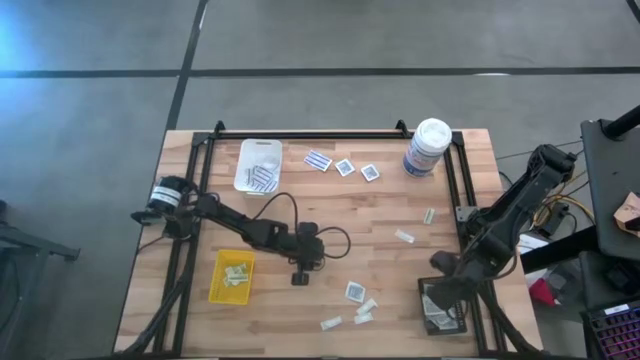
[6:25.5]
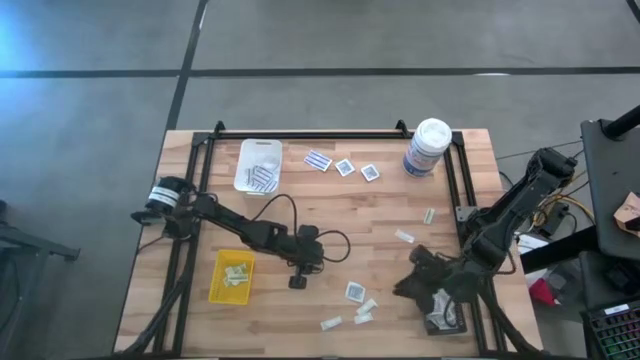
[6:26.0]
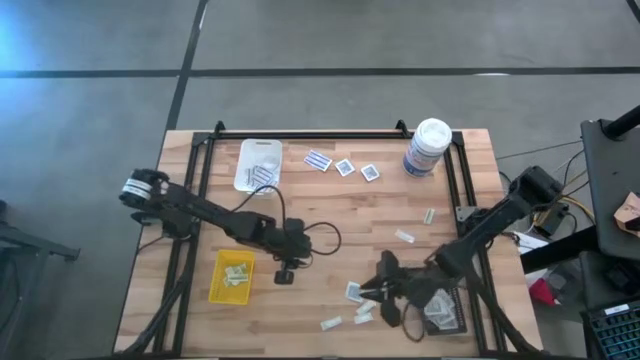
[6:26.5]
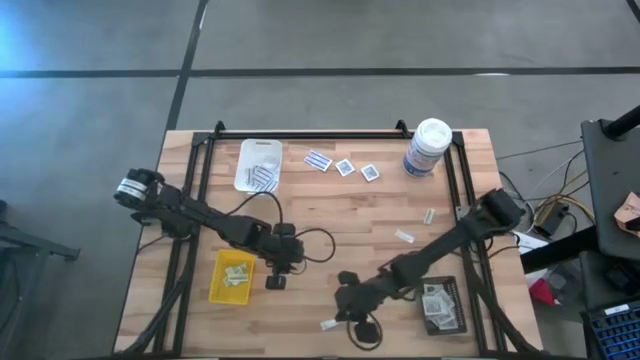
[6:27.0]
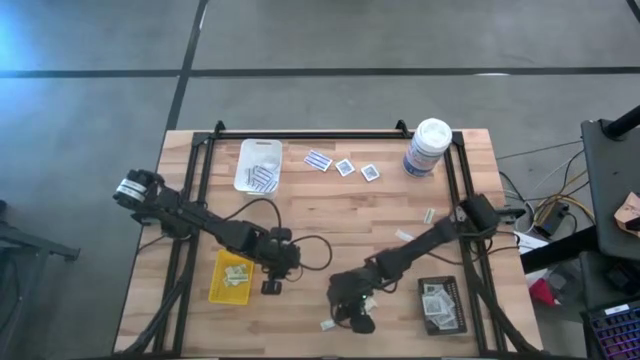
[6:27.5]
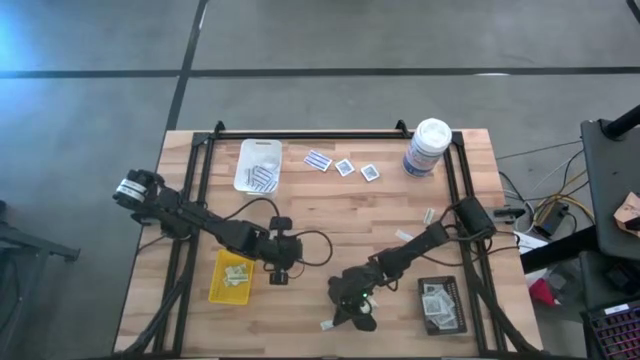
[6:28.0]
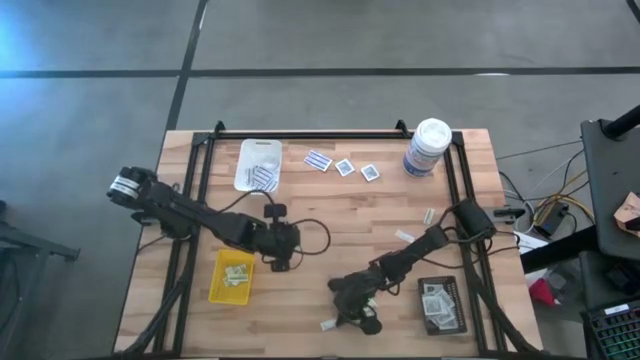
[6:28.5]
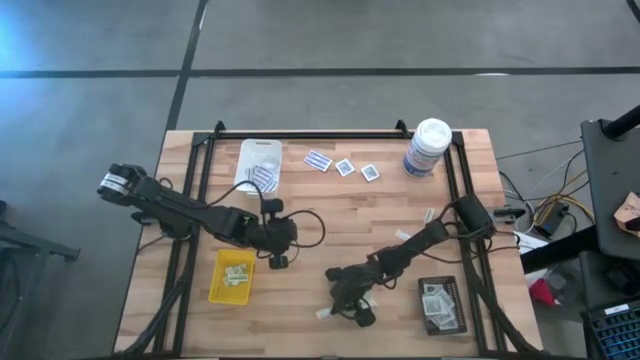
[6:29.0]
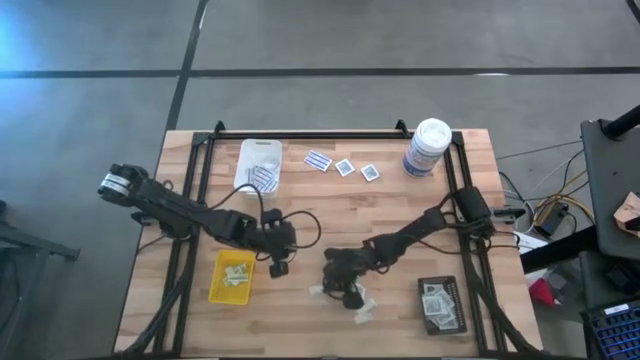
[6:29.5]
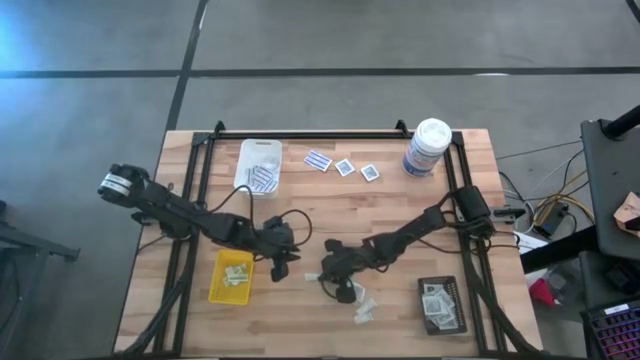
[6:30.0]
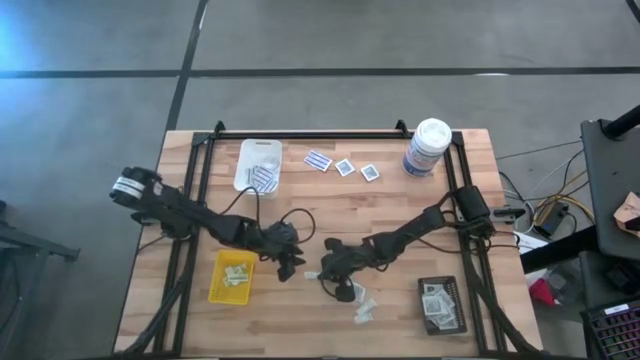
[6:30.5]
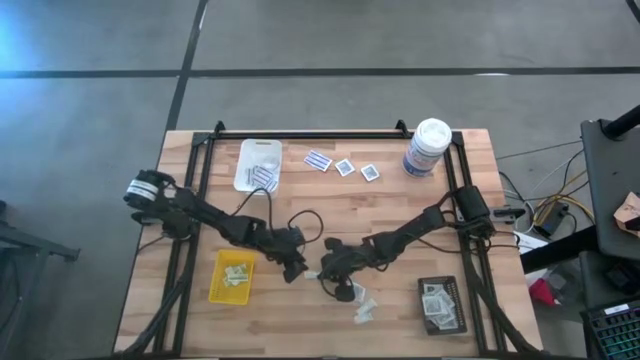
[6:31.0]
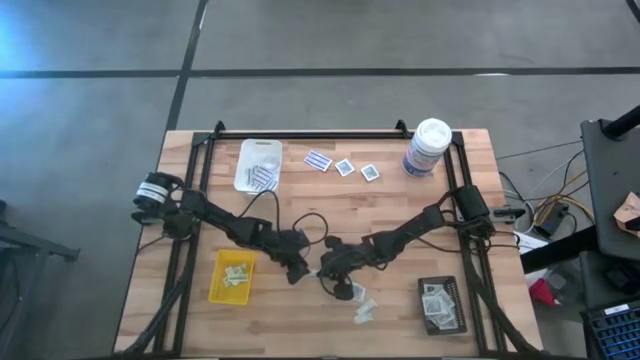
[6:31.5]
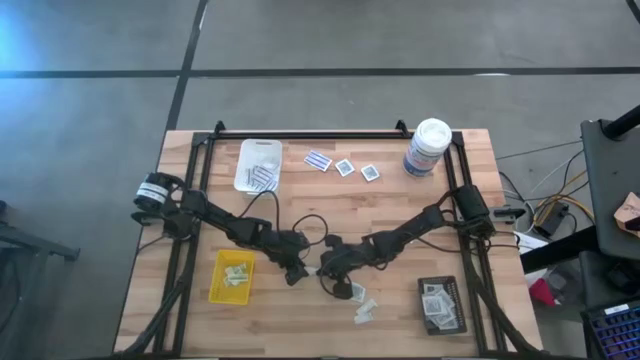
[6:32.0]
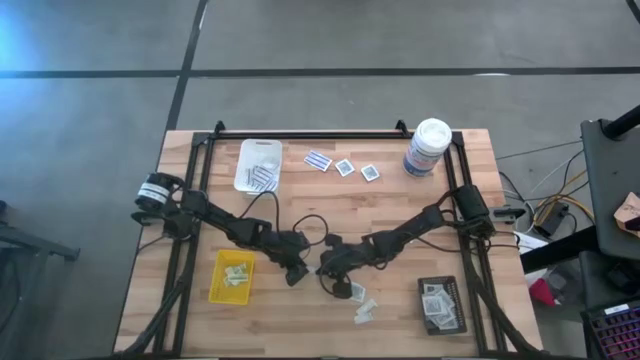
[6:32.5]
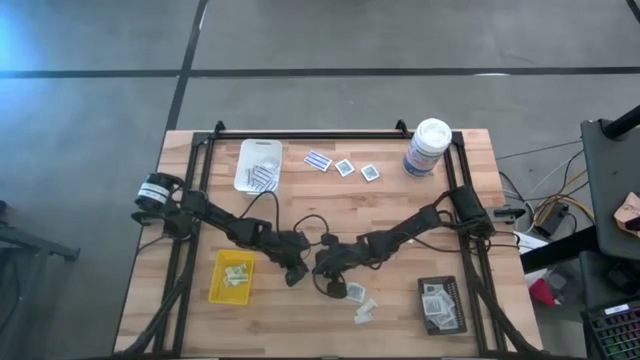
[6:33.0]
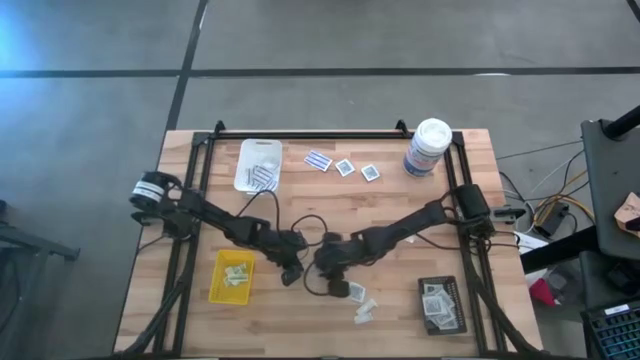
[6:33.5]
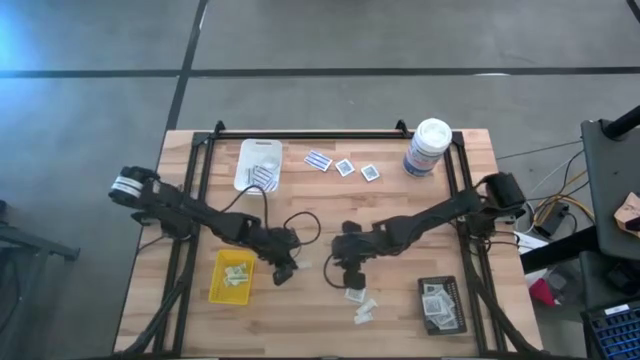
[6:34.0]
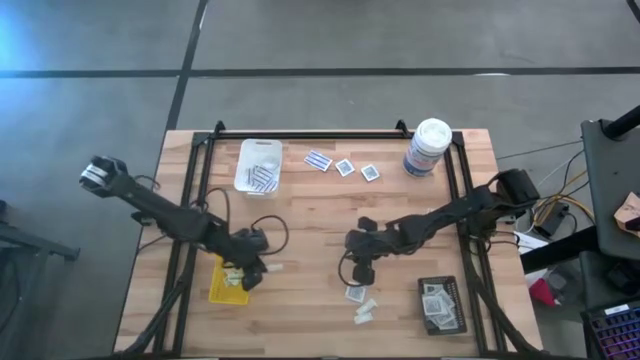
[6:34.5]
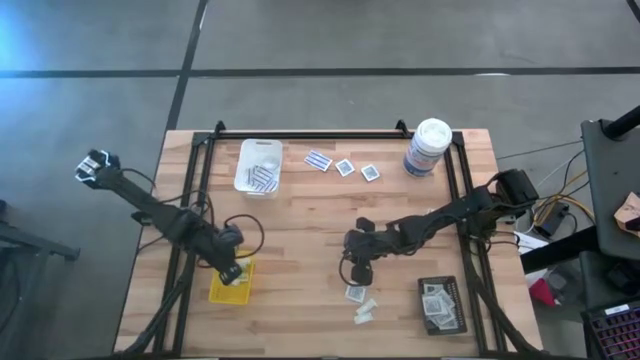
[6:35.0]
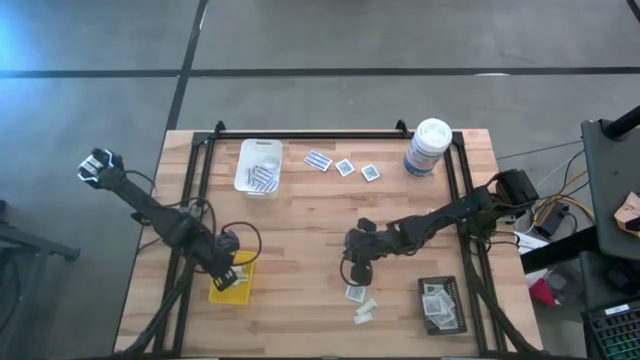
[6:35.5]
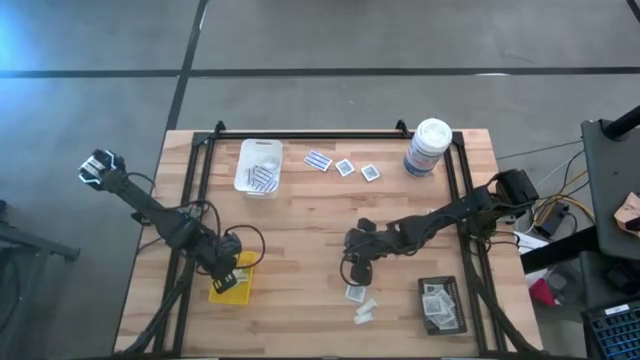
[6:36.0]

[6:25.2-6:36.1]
Task: Pick & Place First Aid Supplies
Put the green bandage into the yellow bin

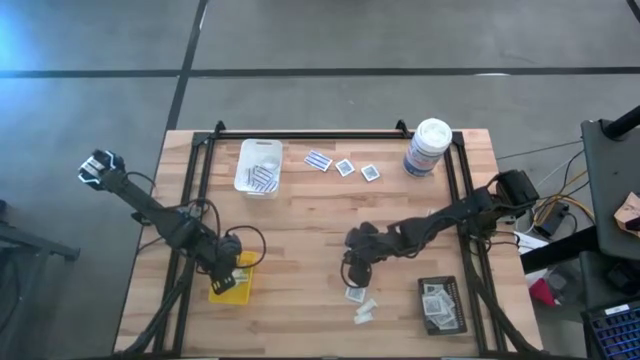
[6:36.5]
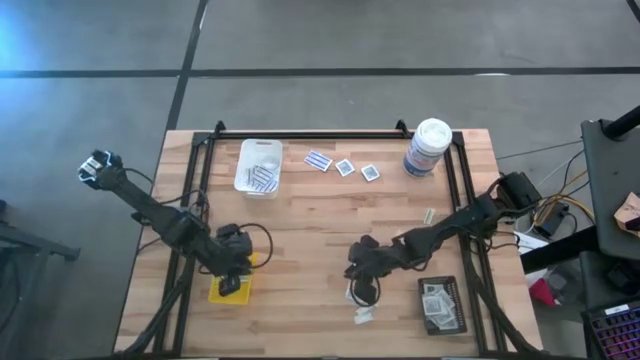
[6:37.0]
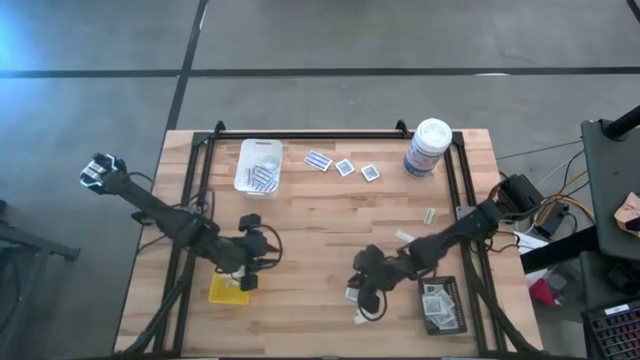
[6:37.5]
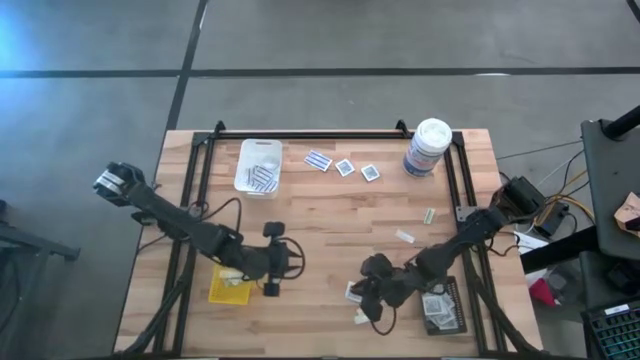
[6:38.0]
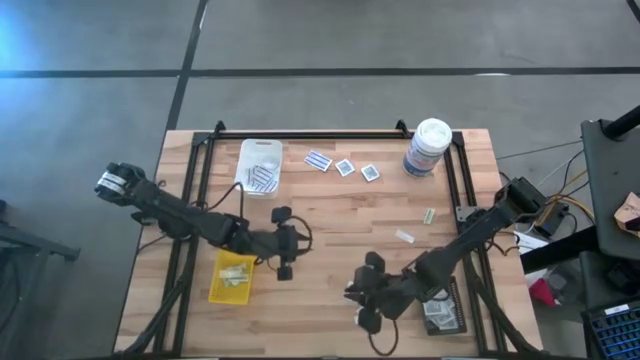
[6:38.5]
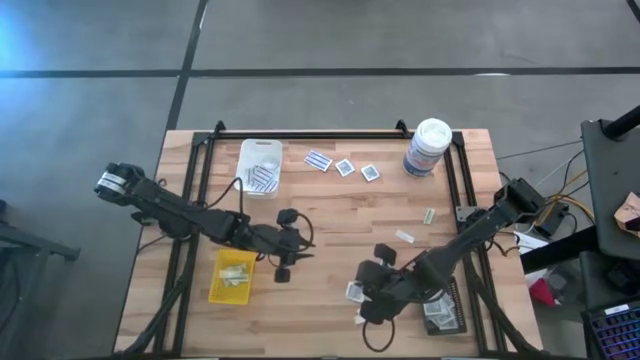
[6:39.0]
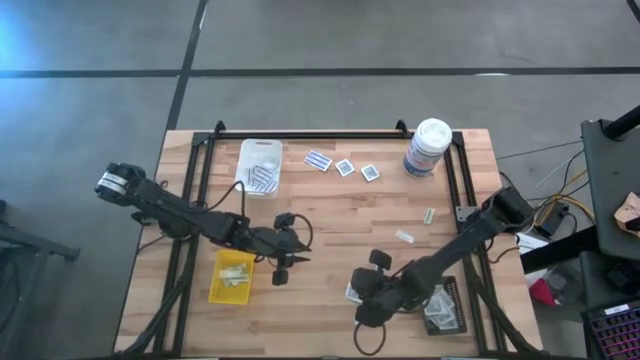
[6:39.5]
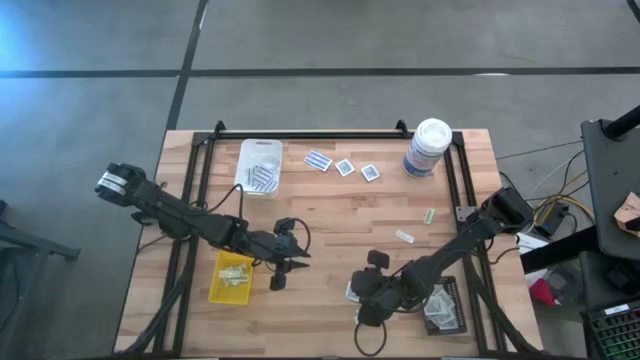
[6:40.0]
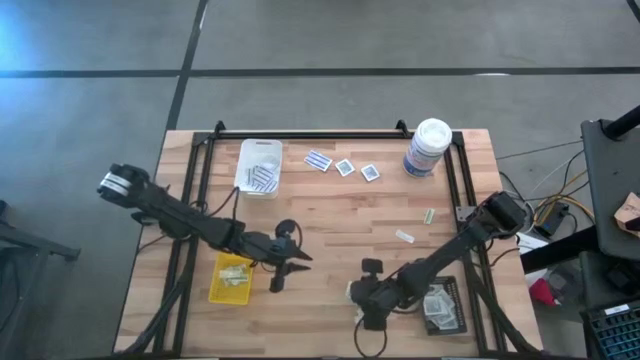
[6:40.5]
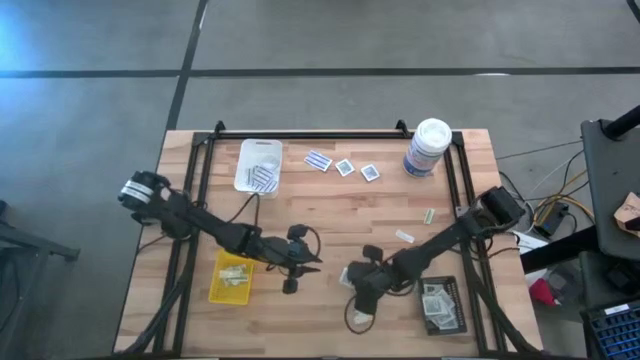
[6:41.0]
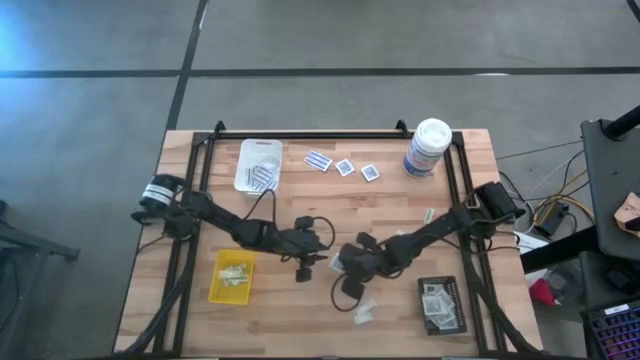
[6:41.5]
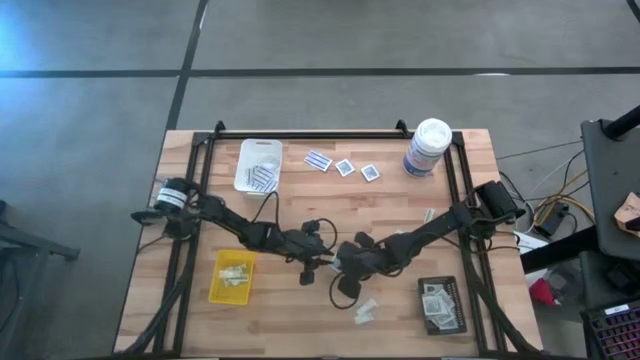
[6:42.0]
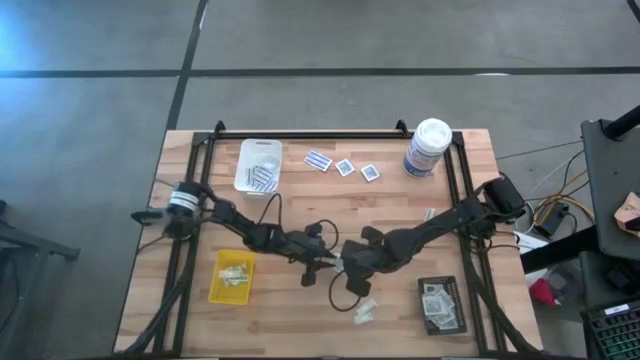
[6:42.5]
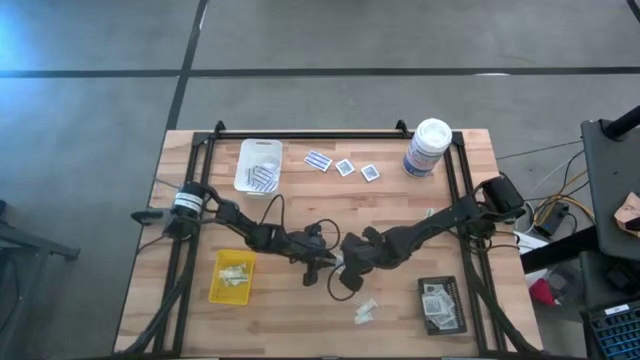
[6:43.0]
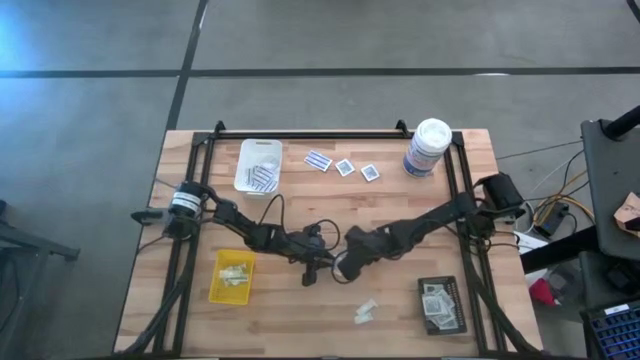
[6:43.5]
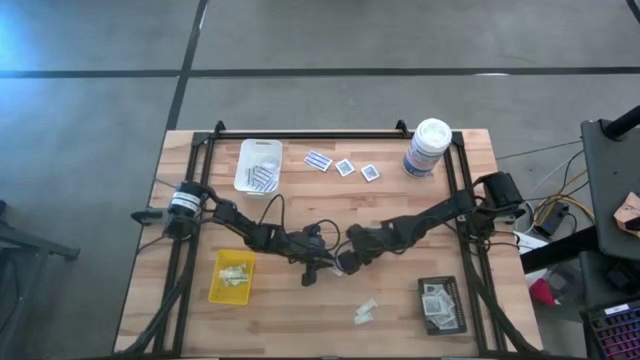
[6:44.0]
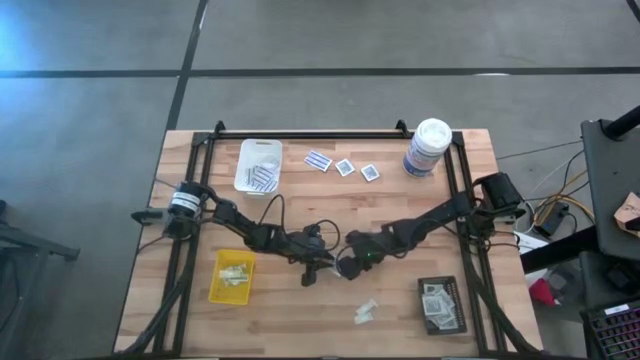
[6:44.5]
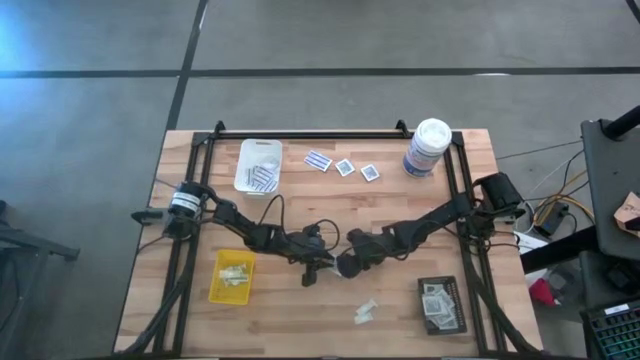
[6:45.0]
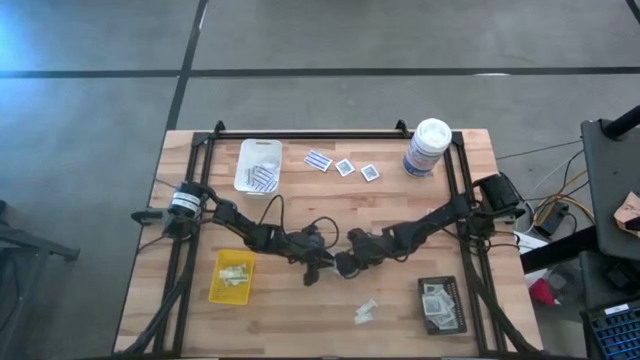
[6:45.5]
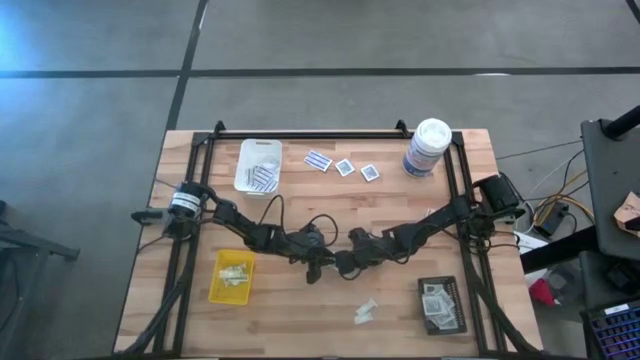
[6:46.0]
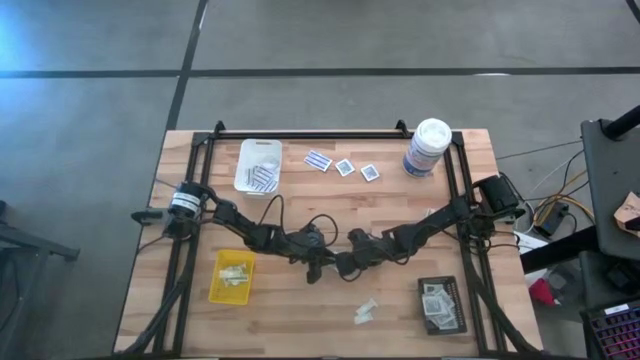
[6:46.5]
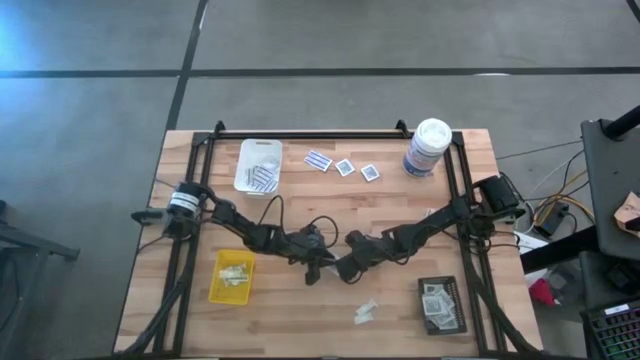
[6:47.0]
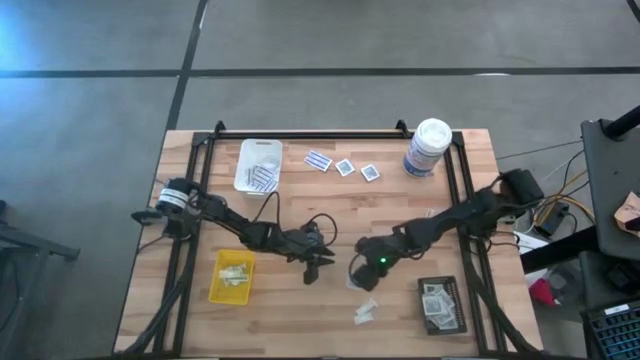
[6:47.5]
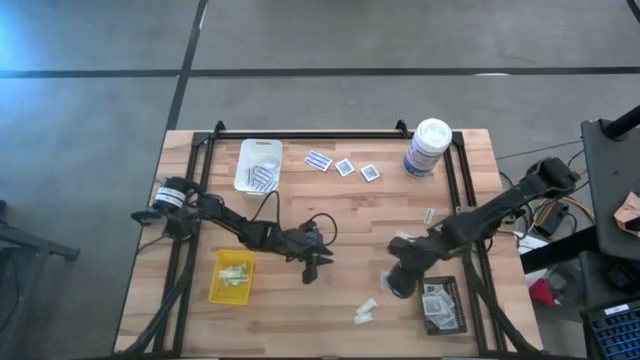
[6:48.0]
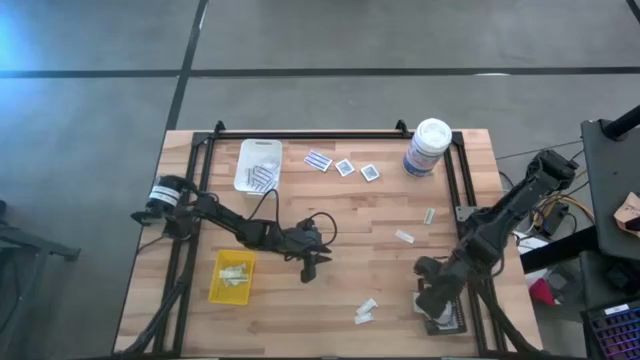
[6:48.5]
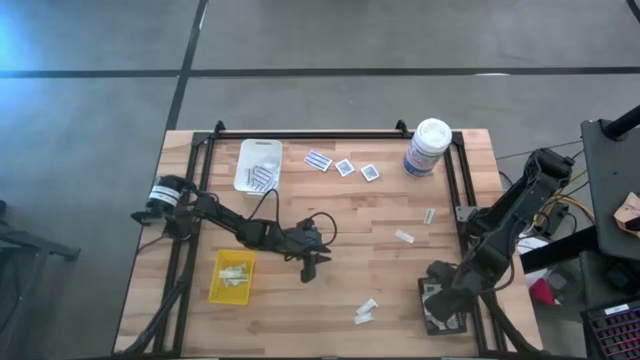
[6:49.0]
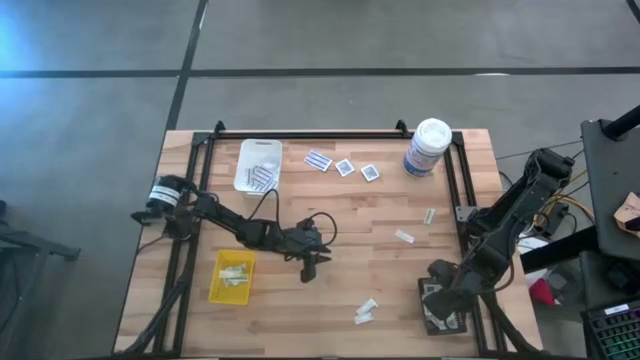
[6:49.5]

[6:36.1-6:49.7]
Put the towelette pack into the black bin
